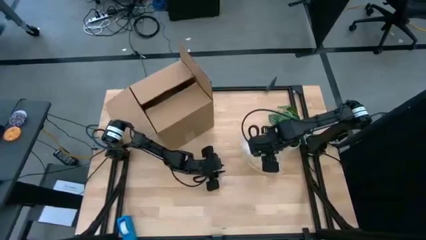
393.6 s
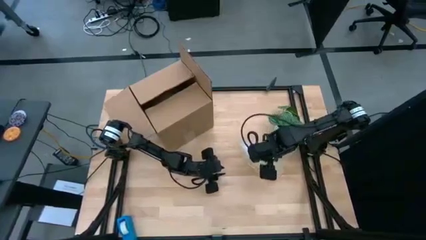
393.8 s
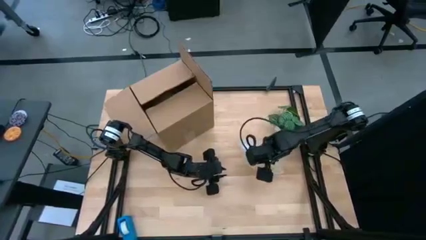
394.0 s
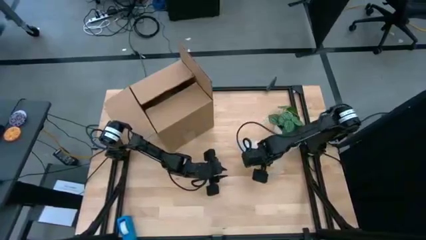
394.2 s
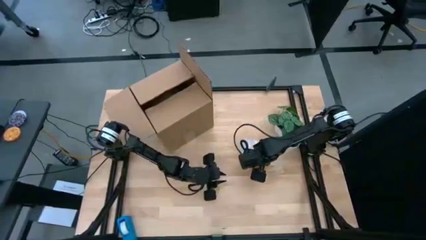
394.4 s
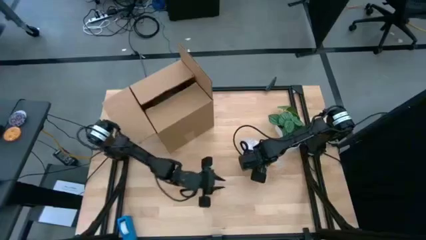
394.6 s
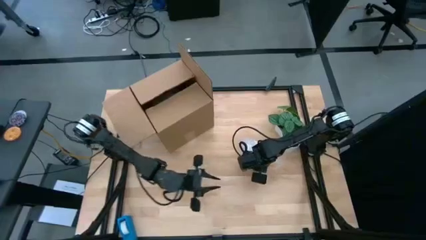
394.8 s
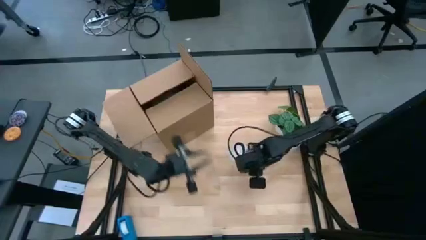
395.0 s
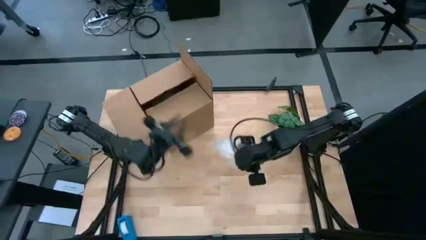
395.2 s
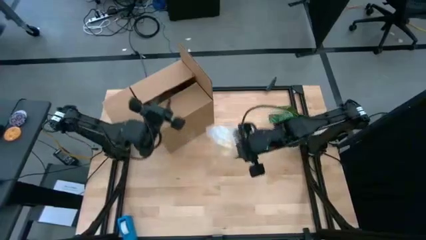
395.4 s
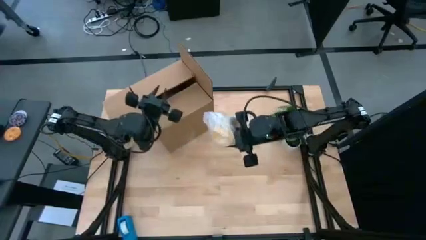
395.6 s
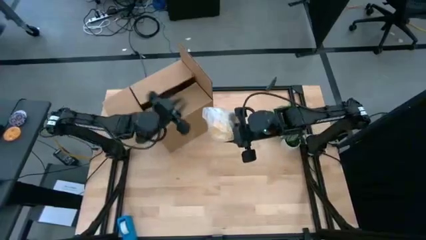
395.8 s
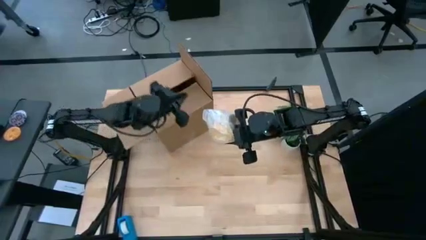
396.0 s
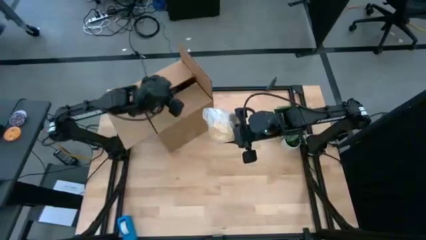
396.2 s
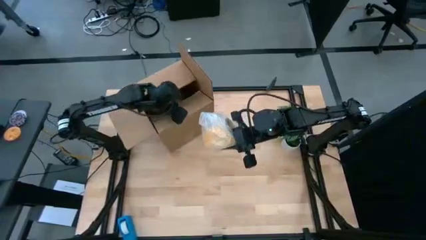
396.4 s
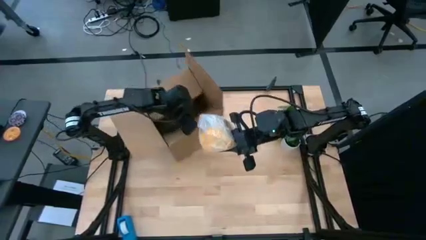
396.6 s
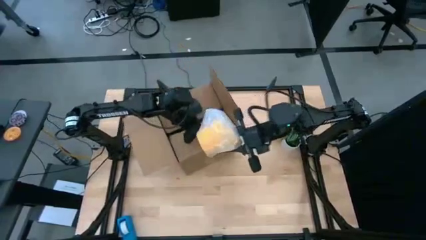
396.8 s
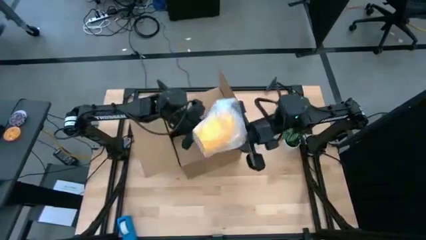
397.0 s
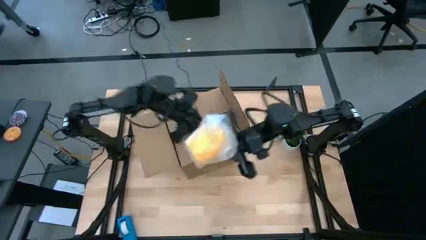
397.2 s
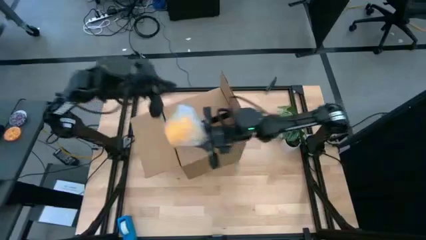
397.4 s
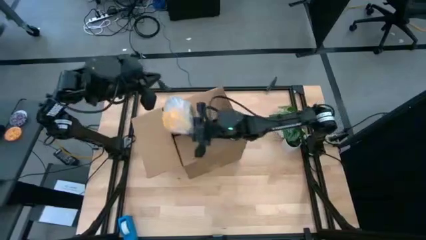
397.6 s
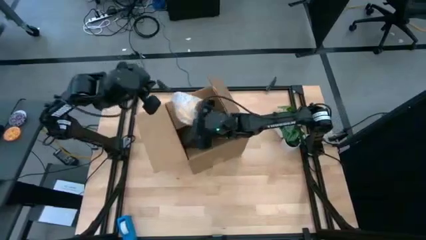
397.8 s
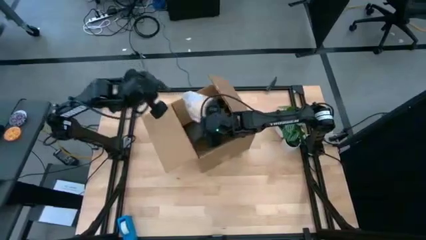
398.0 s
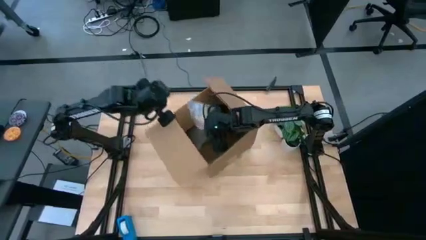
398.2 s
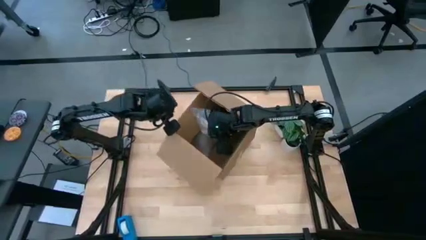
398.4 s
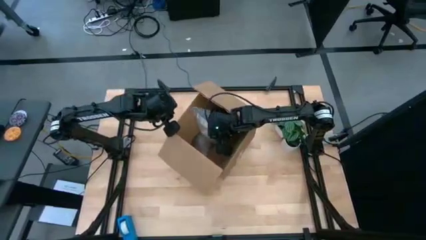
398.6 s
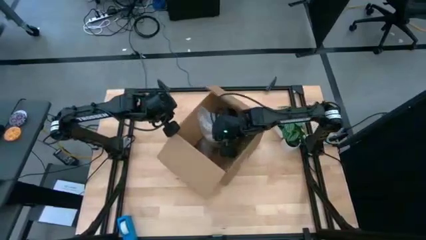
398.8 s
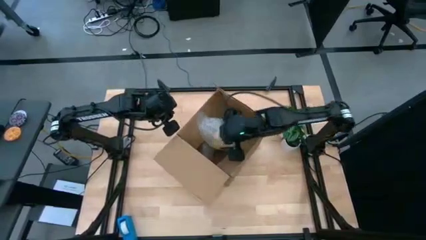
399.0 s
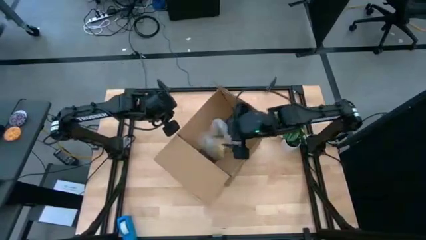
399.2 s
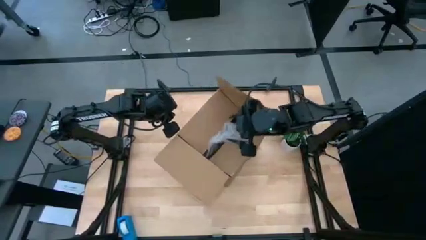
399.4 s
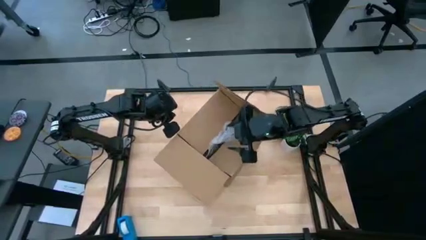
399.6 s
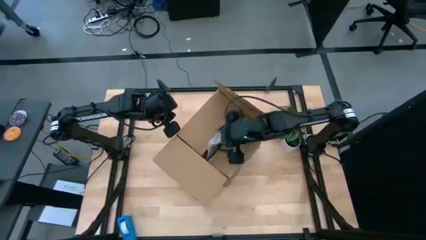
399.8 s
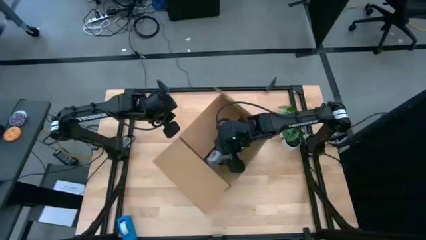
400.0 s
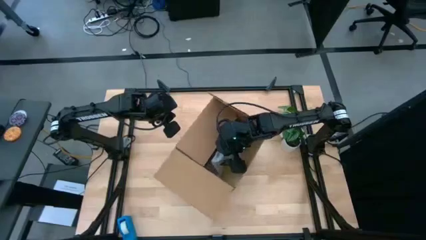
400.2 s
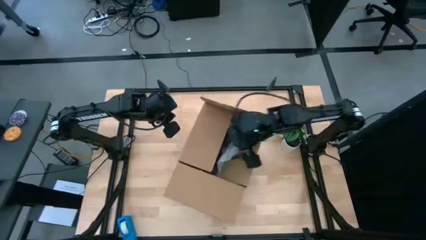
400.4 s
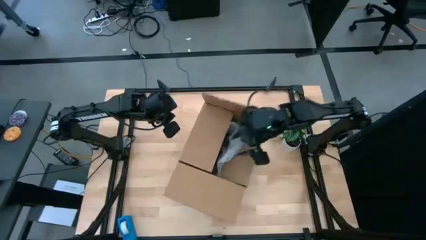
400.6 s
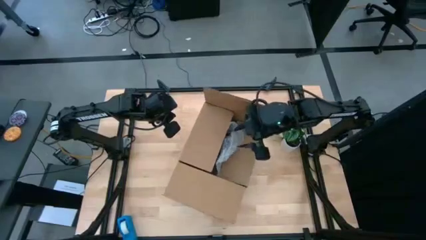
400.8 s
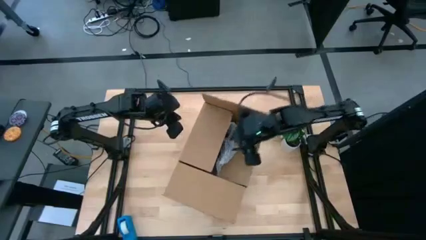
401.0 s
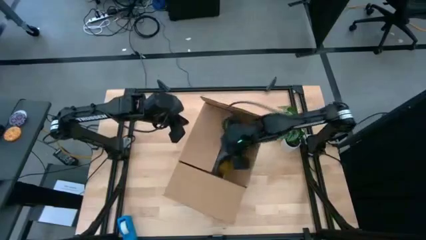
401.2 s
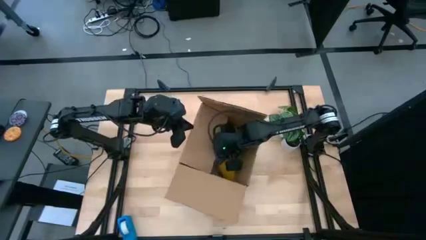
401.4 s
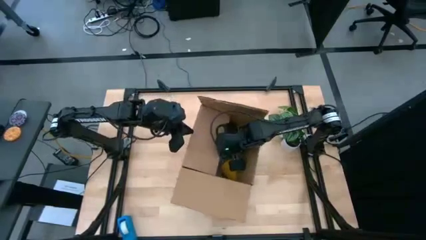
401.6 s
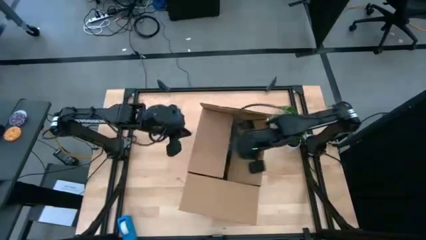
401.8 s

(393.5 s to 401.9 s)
Task: wrap mug
Put the wrapped yellow mug into the box

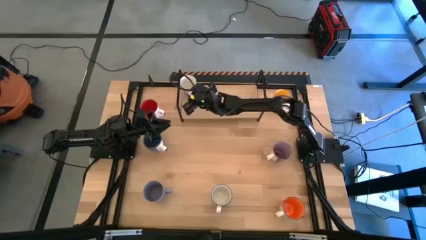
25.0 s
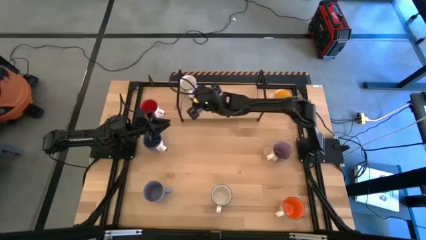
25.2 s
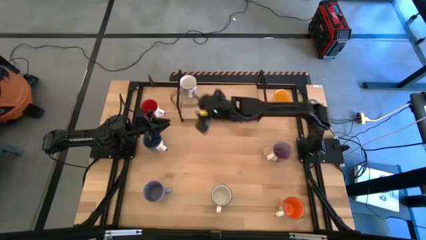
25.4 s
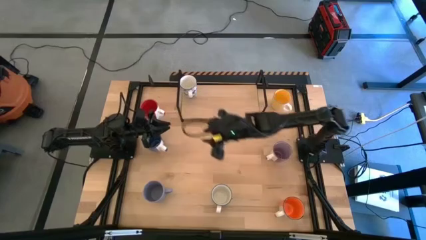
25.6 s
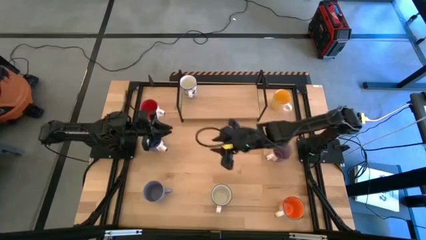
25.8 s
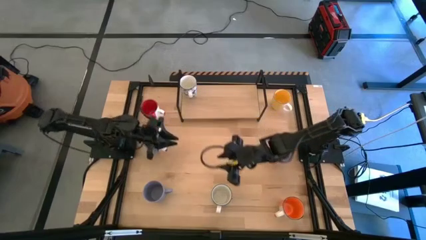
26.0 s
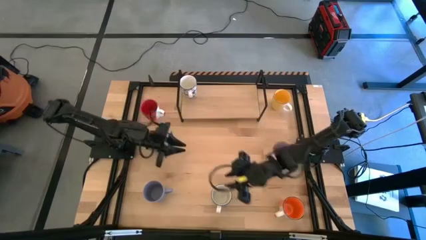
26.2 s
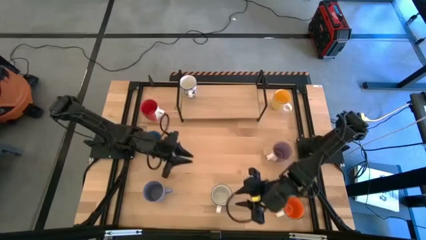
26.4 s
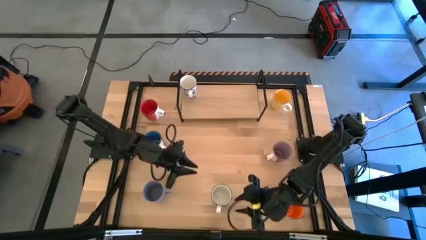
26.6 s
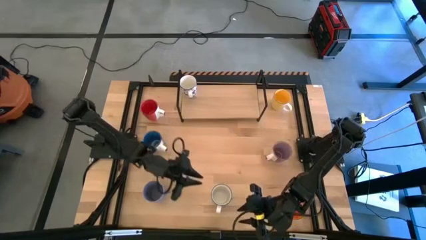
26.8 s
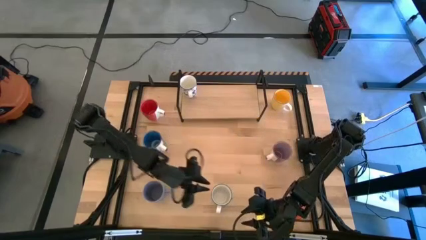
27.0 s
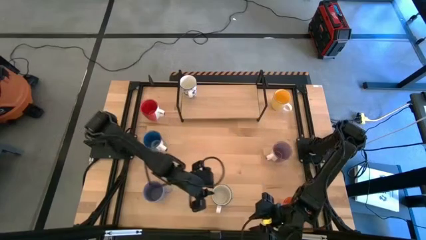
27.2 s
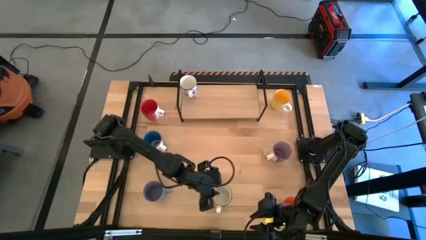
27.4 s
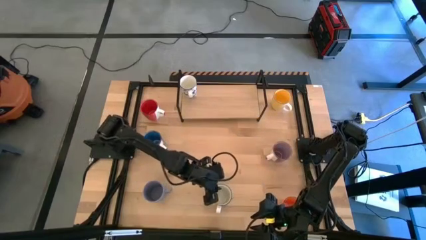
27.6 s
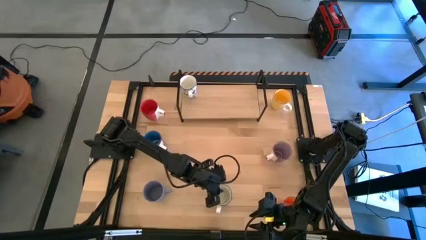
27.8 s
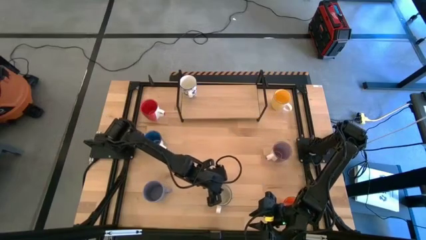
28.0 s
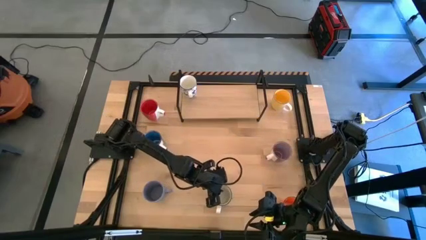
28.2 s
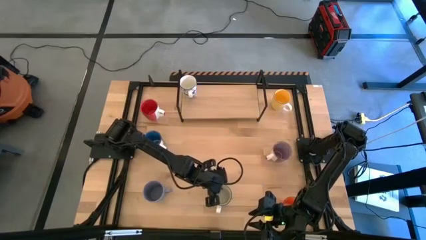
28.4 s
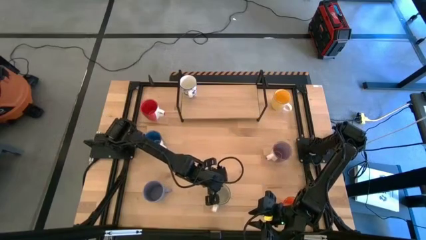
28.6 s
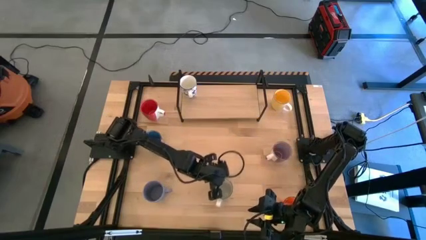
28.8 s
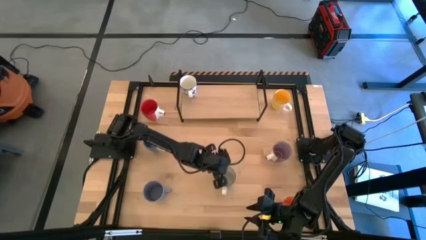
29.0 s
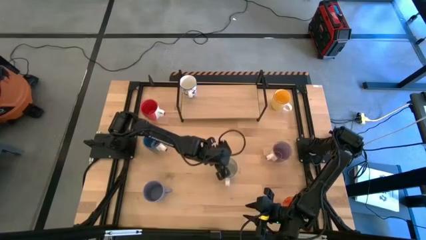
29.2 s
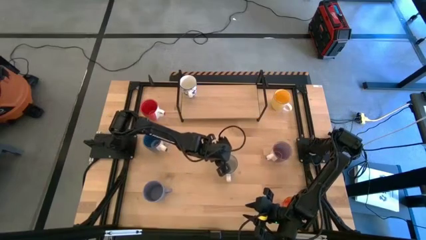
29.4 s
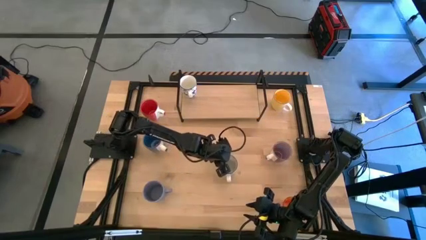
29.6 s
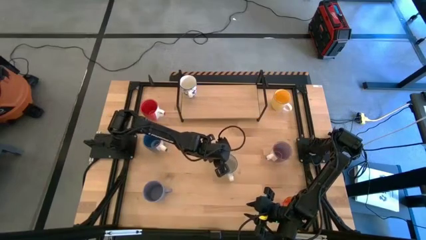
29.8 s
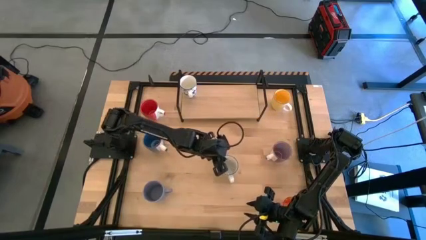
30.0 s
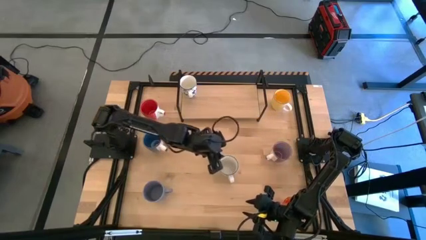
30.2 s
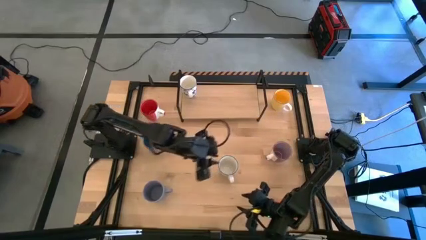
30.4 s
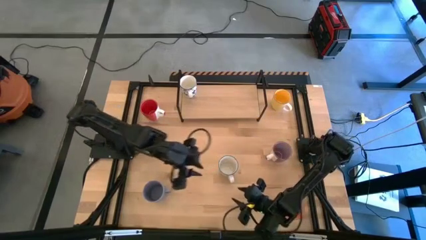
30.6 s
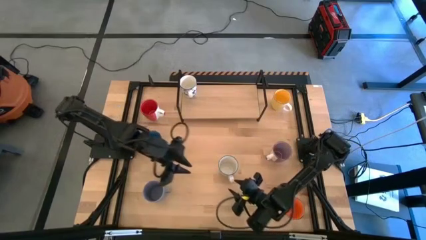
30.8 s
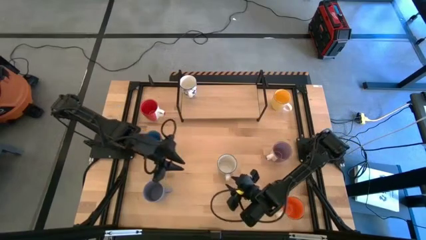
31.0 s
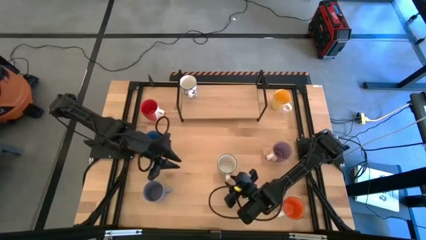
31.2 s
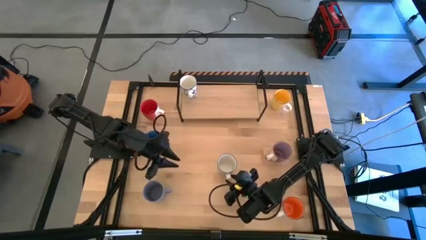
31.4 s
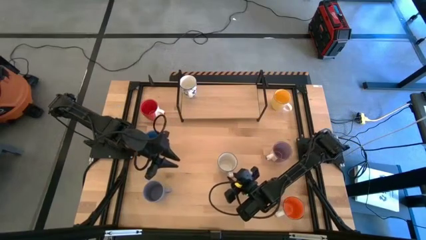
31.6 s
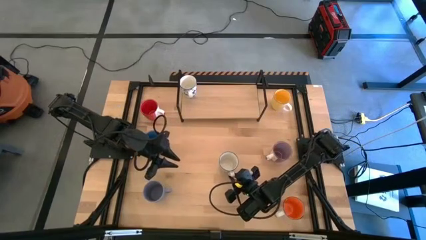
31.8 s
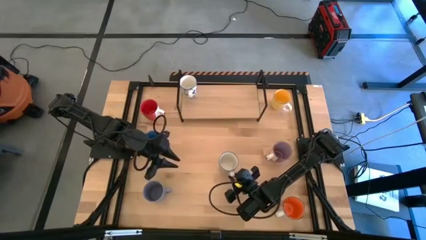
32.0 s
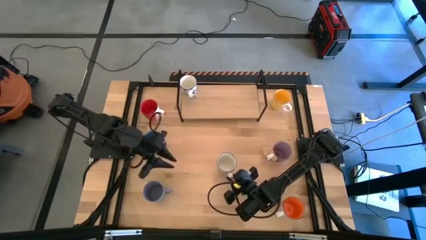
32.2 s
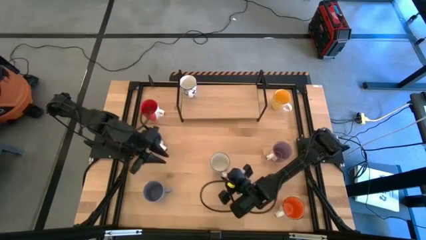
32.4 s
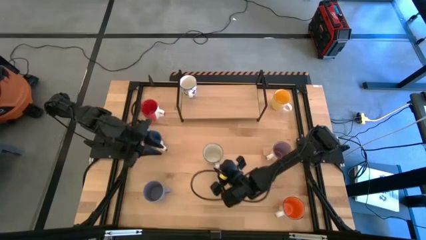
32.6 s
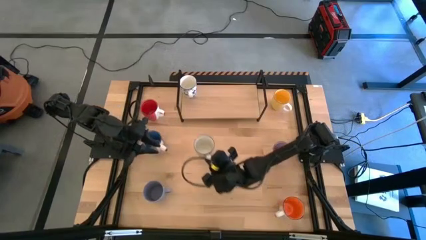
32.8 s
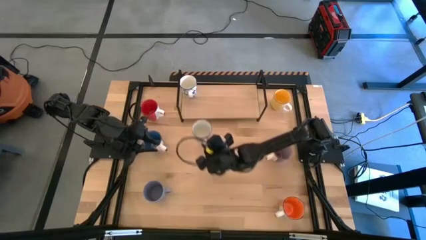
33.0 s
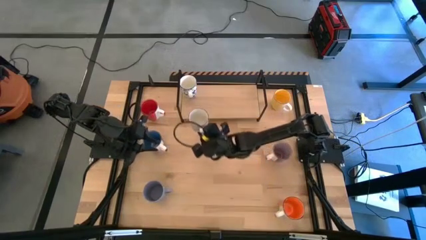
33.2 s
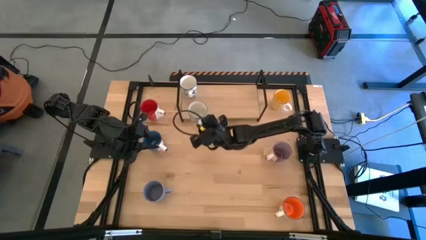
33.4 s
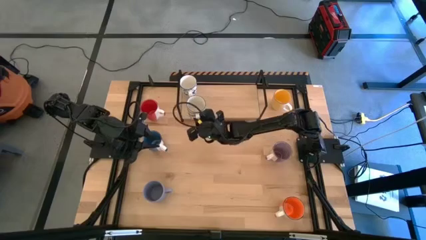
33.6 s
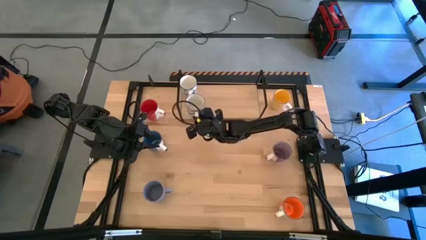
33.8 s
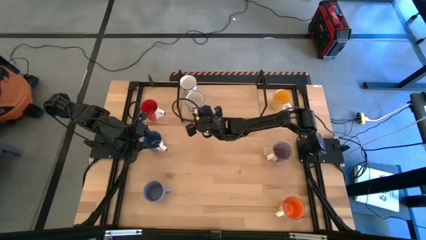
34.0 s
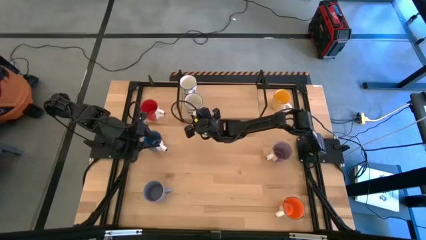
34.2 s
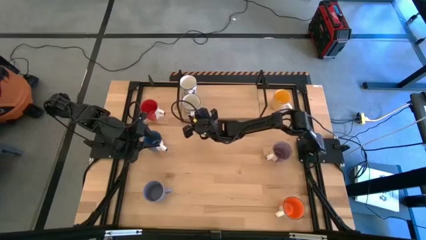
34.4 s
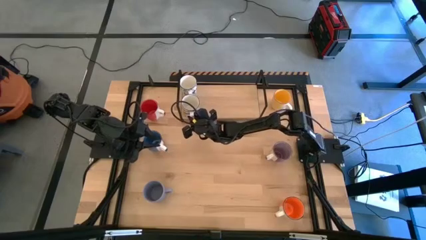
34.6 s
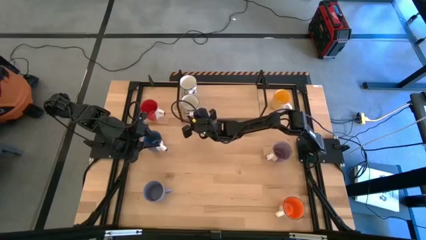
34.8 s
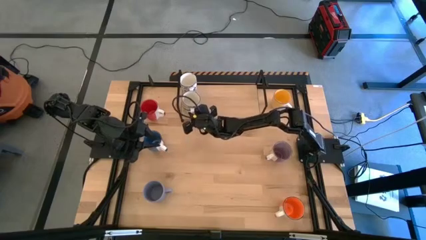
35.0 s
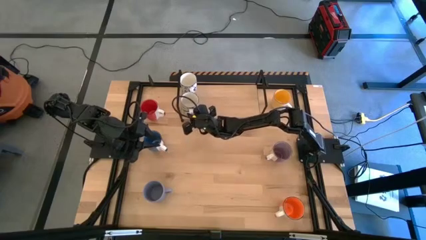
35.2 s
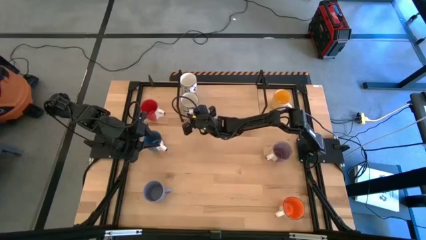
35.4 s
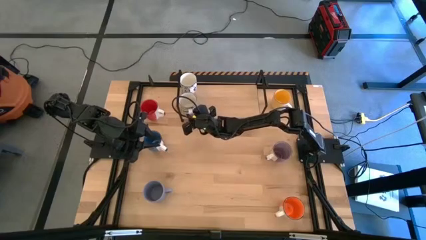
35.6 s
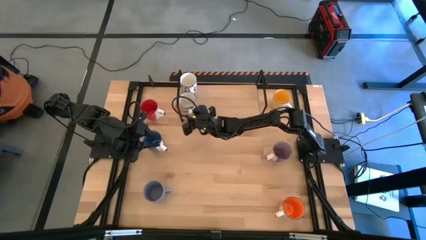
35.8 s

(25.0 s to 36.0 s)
Task: Place coffee mugs
Put the blue patterned mug on the shelf
